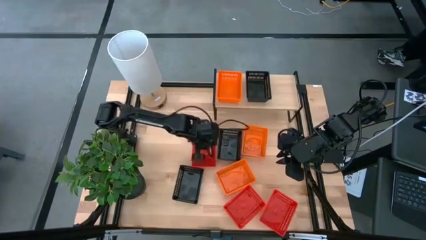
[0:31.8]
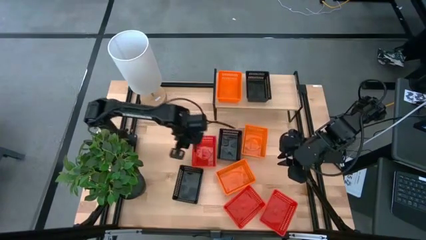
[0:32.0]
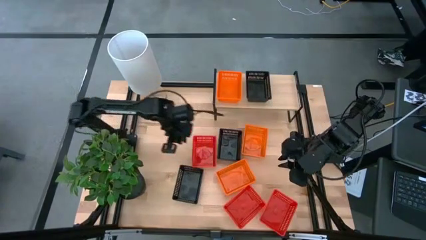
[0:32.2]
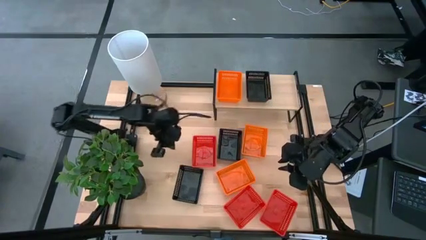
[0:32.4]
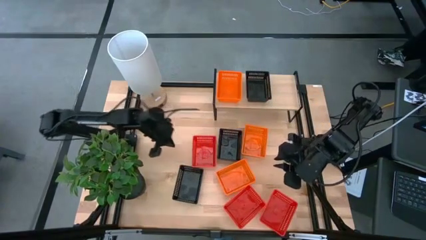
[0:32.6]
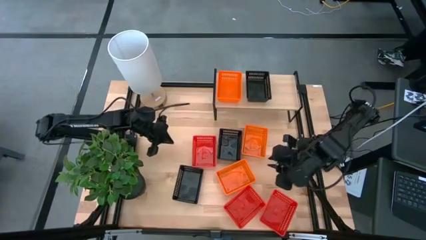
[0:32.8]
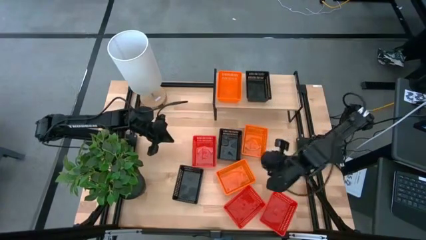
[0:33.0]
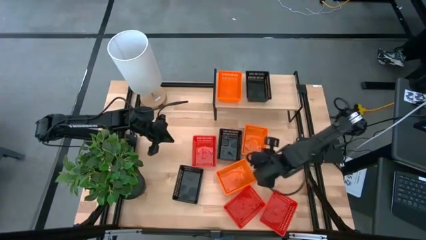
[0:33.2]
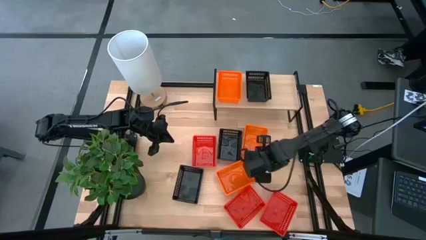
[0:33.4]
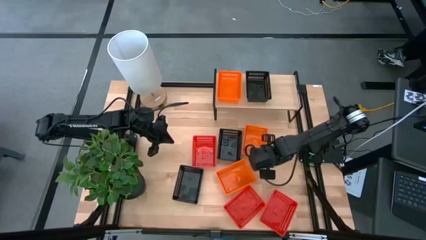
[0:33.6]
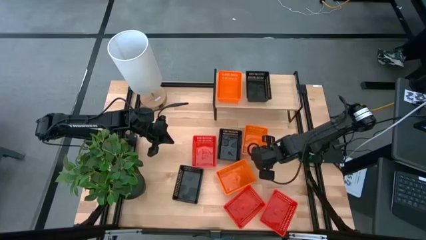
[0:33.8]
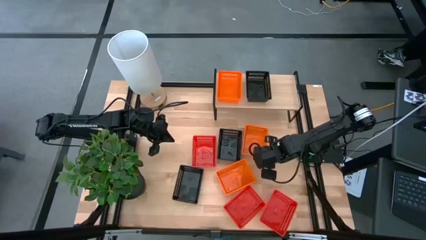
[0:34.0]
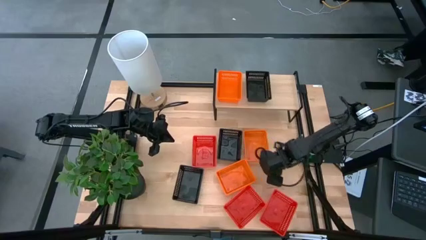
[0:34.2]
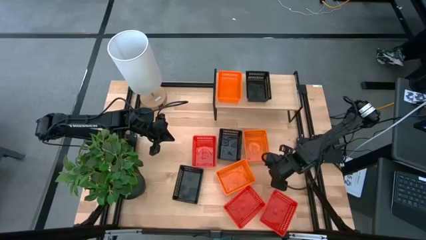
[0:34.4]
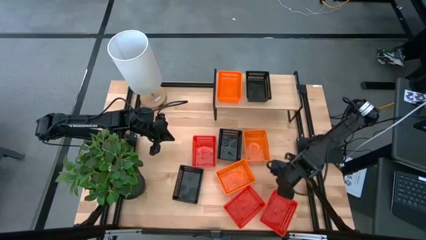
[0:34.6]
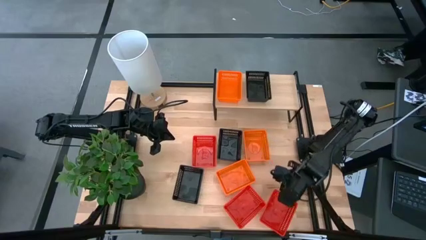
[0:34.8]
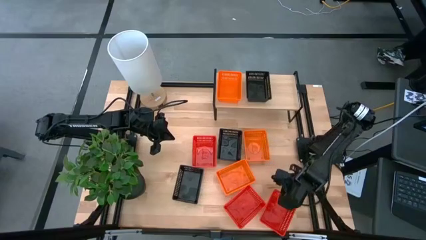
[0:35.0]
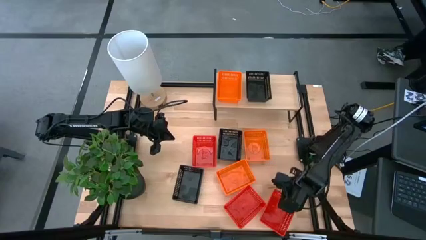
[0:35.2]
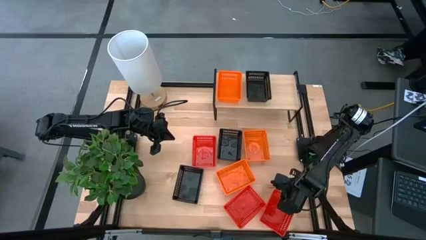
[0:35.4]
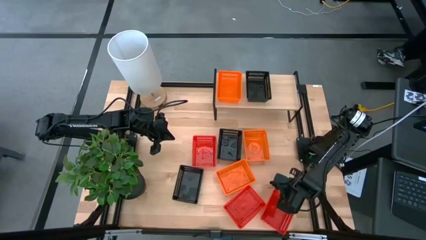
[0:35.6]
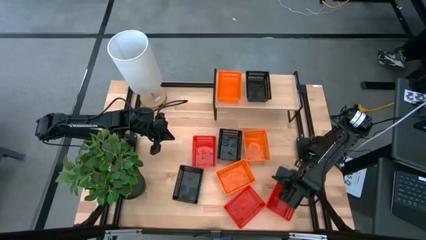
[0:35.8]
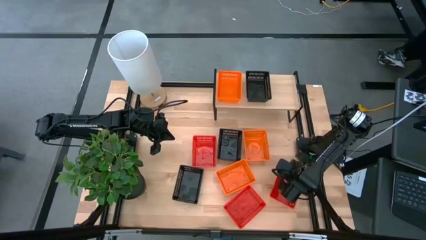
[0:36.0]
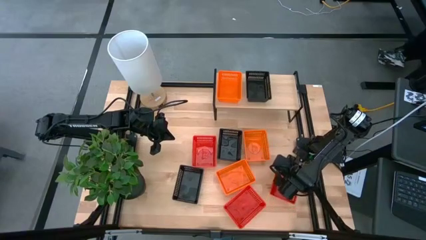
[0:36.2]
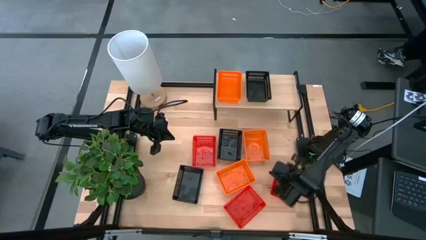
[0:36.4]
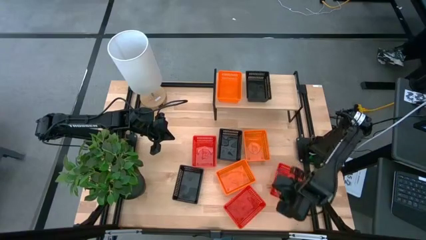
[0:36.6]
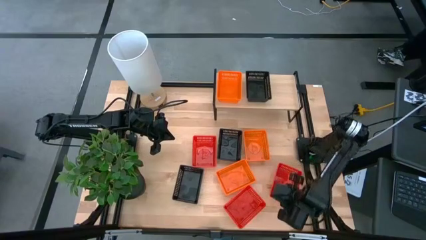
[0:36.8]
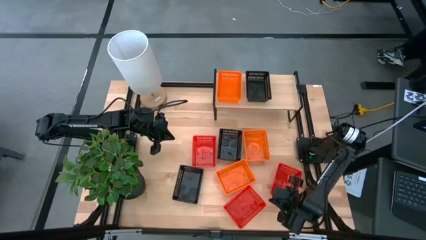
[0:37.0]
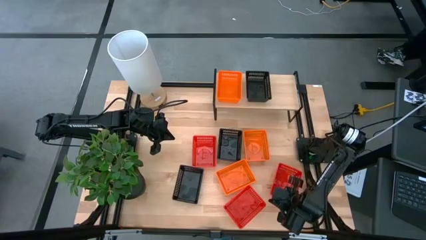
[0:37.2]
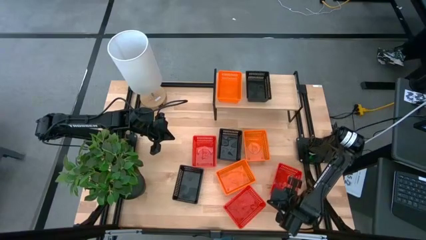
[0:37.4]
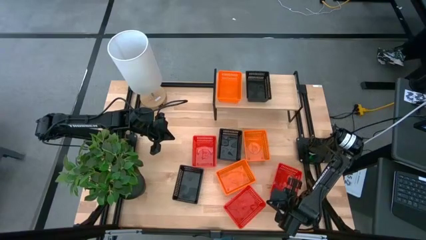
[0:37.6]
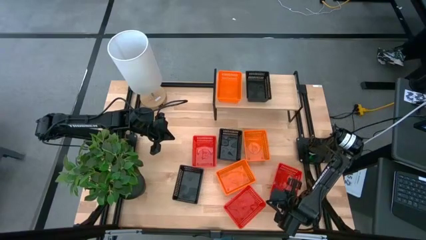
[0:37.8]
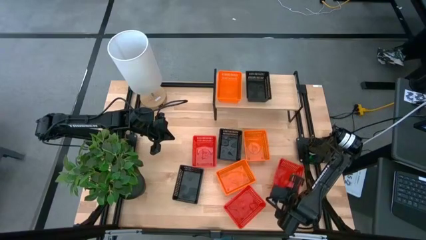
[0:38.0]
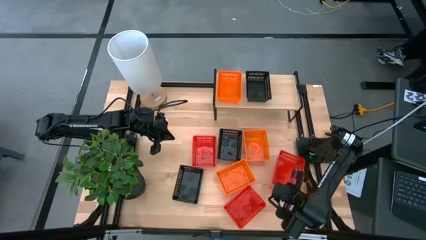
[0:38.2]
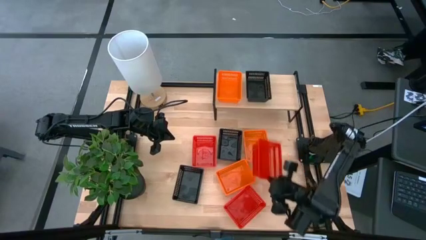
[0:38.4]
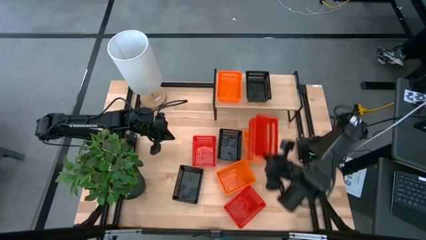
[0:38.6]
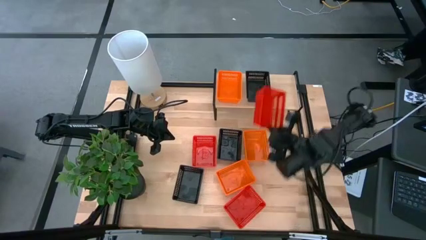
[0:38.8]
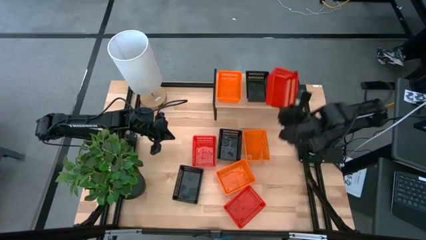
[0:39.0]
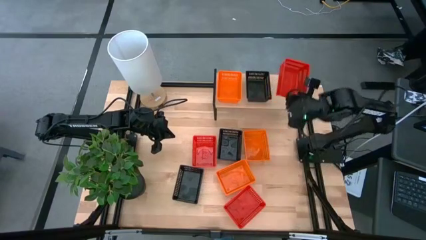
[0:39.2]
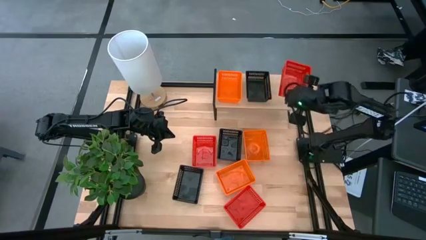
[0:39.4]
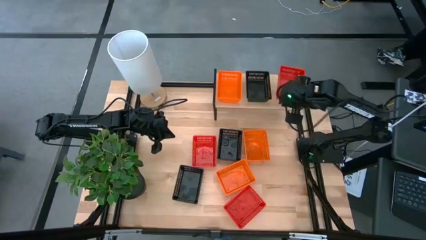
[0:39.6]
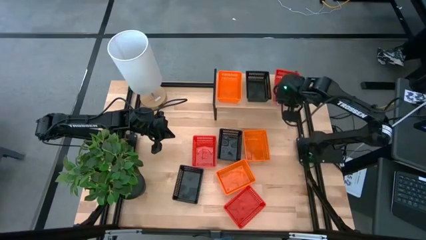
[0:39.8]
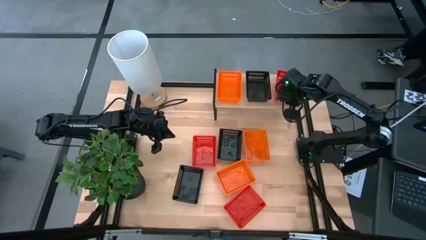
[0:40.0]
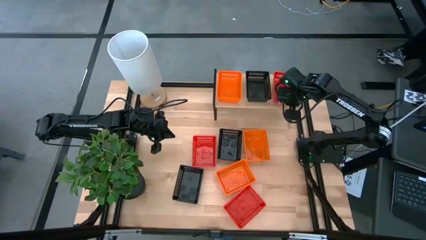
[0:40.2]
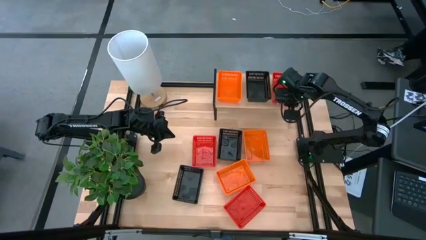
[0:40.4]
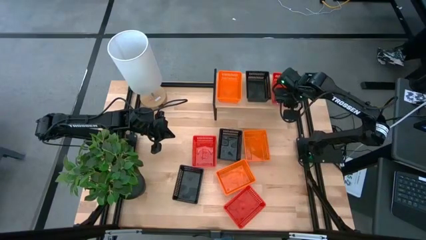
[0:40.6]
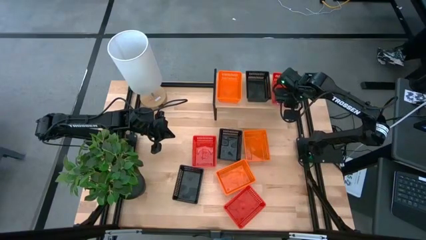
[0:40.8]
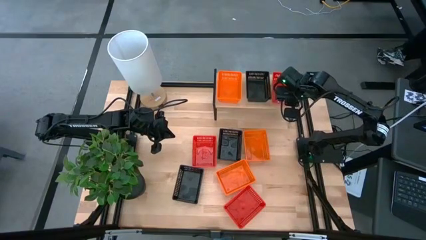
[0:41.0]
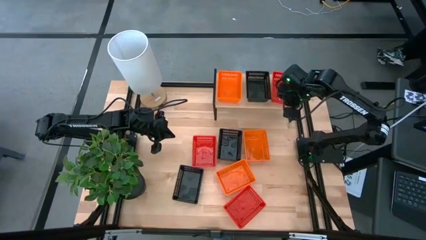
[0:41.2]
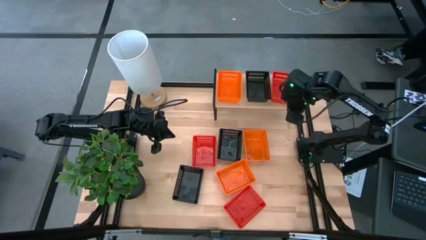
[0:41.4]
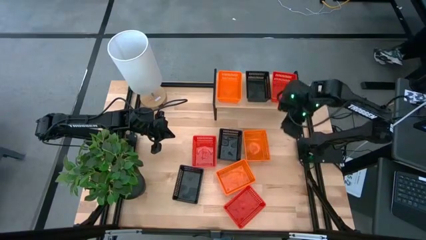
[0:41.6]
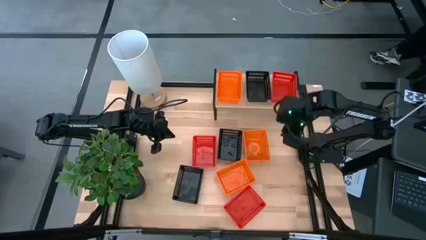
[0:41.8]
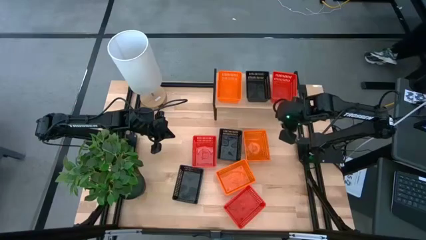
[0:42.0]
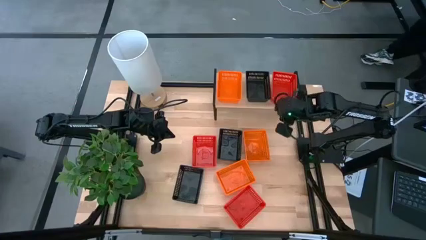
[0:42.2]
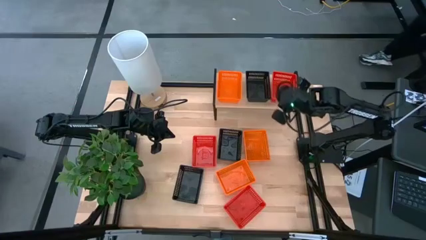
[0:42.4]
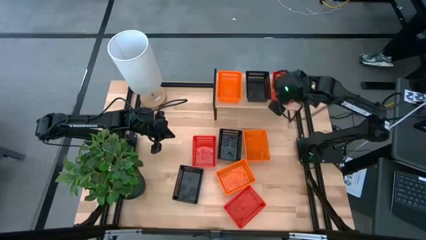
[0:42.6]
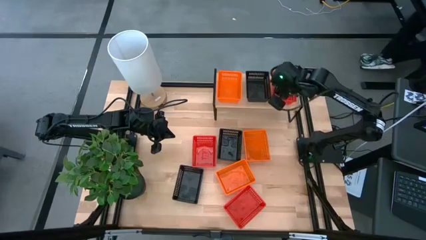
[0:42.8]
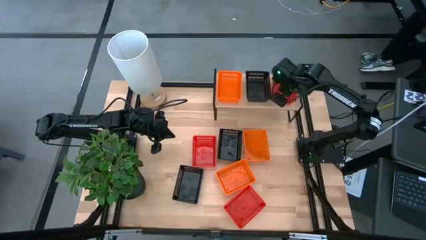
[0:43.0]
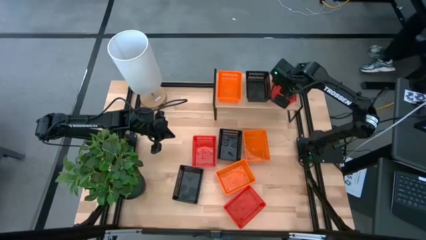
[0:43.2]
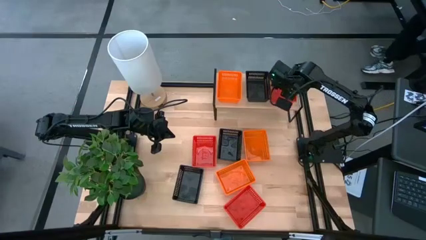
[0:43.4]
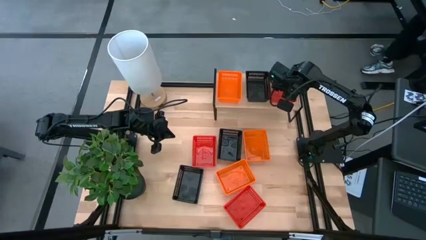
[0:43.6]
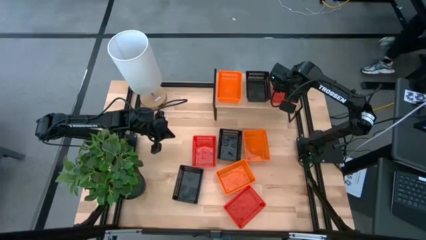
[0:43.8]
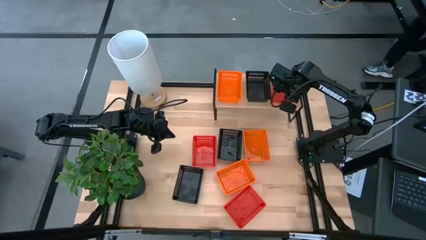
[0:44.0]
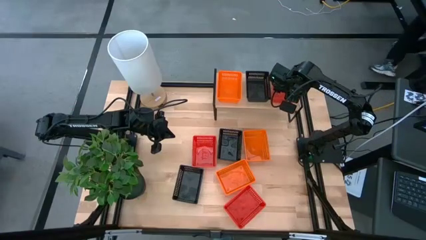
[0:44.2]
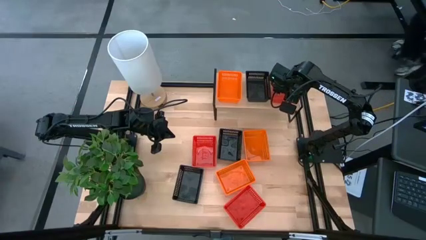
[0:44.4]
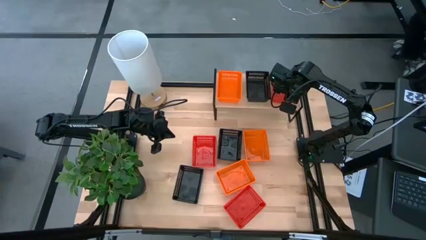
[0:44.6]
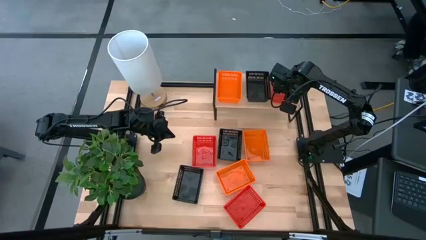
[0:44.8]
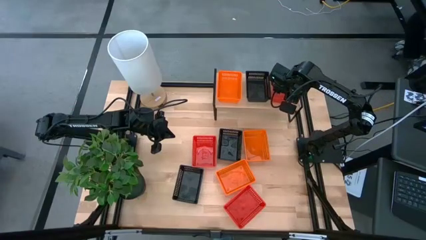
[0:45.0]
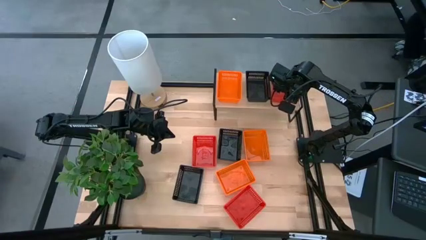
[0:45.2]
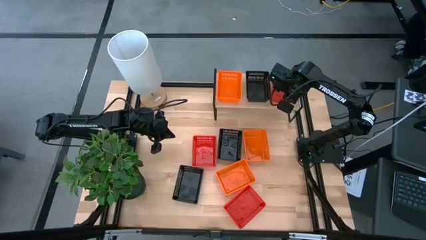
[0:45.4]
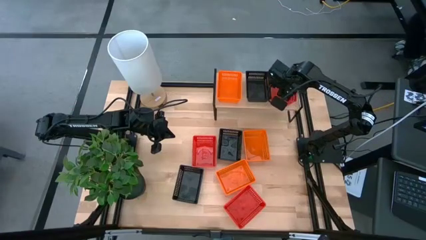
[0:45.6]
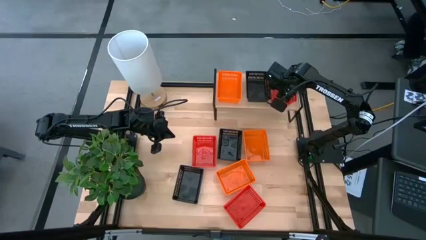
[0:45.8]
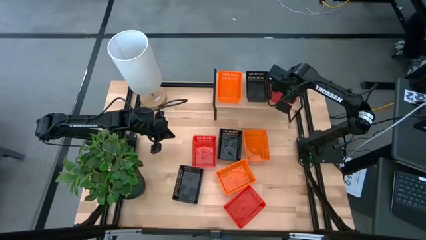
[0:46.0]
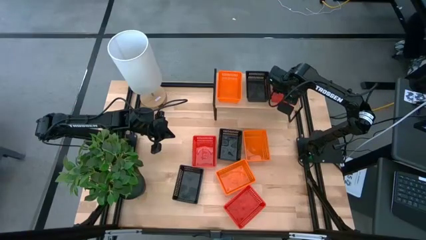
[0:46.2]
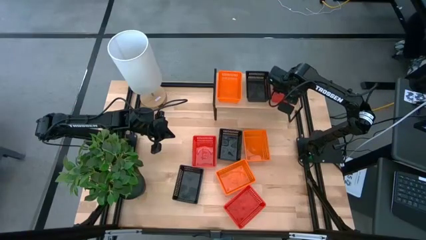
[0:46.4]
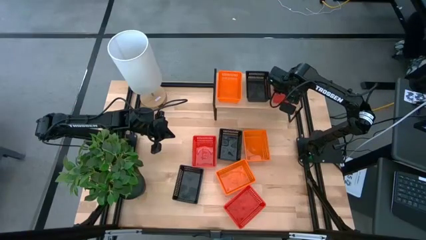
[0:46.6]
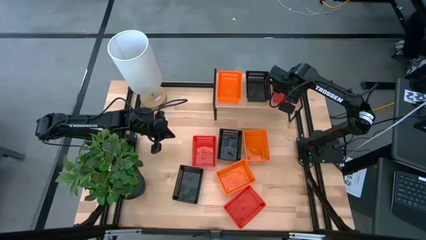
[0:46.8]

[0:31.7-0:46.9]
Task: Stack baskets on shelf by color
Put the bottom right red bin on the shelf

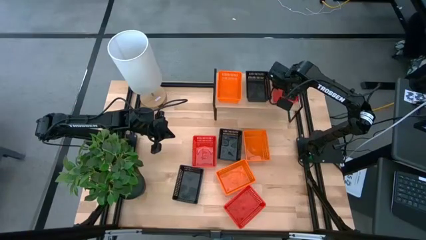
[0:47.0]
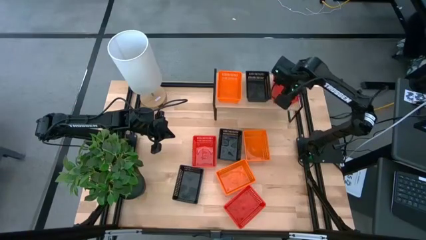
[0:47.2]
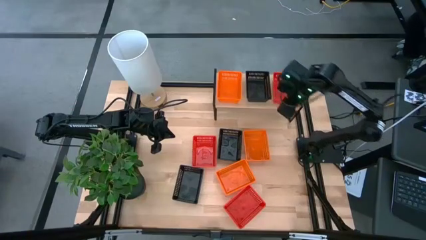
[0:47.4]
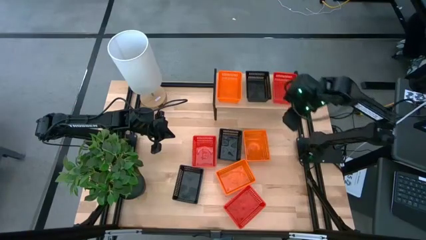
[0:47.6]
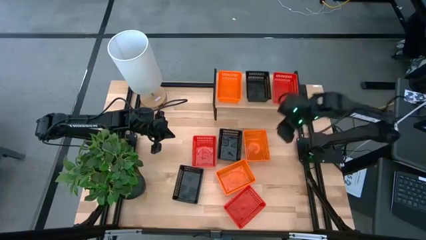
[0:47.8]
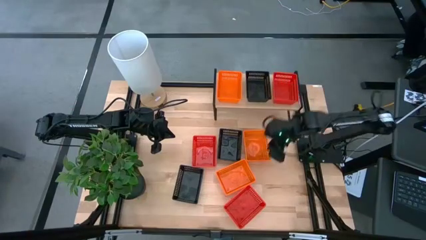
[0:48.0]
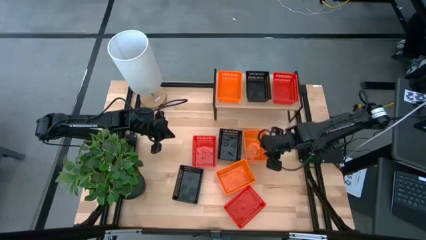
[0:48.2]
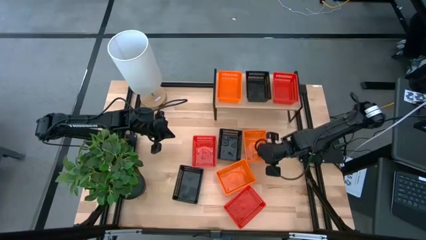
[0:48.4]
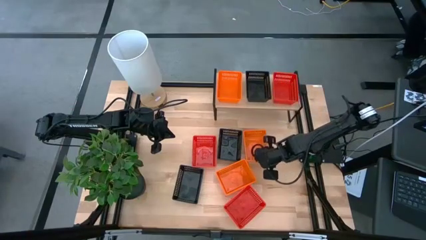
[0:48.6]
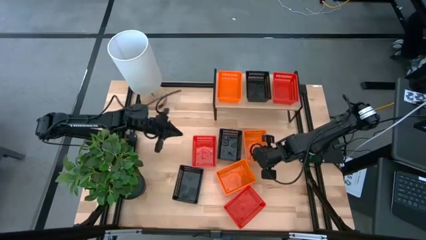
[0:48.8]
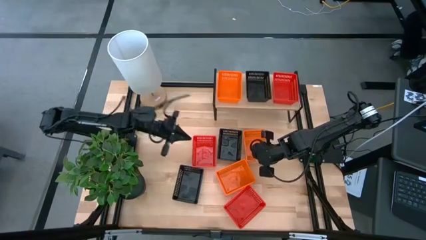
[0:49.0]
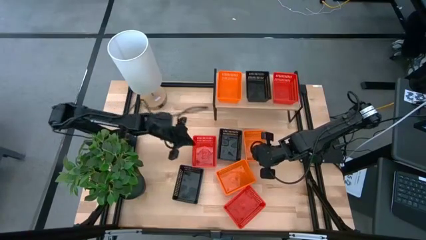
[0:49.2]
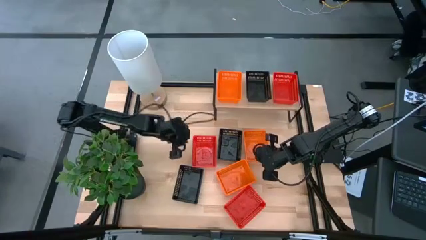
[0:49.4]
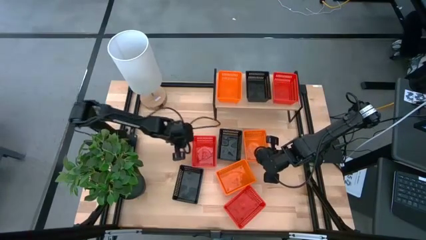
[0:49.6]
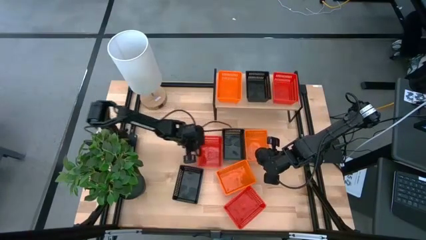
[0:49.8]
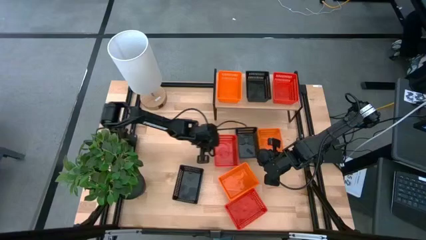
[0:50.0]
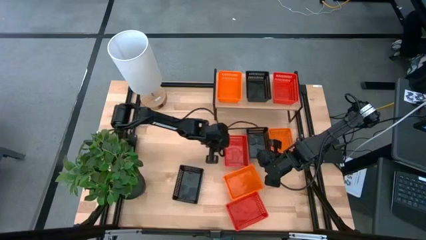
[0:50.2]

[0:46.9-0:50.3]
Adjust the red bin on the table
